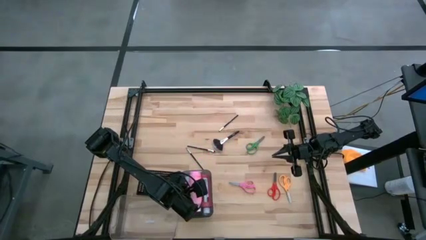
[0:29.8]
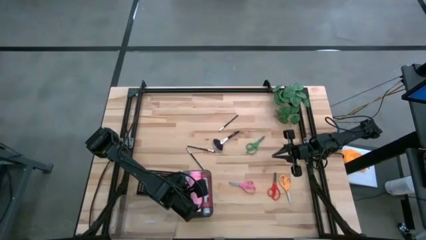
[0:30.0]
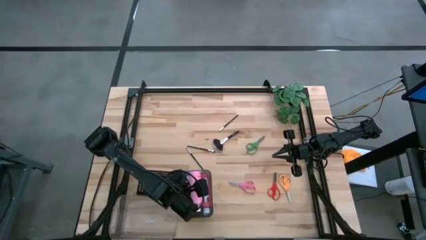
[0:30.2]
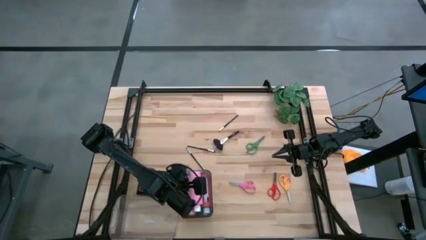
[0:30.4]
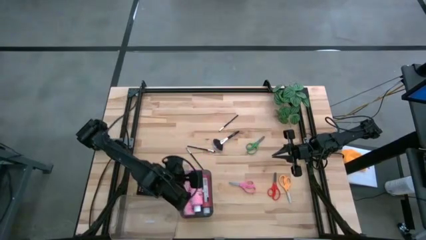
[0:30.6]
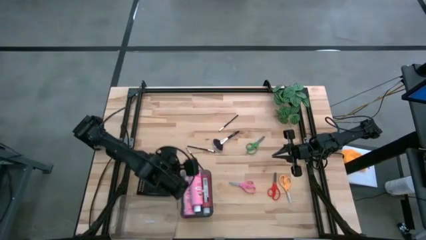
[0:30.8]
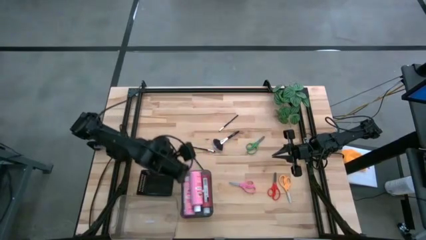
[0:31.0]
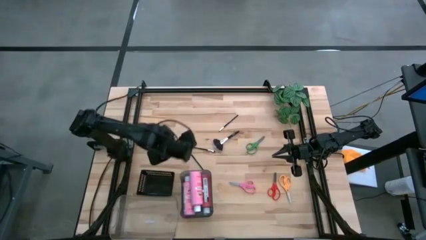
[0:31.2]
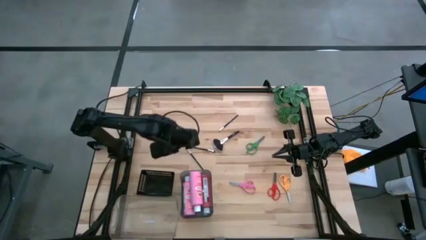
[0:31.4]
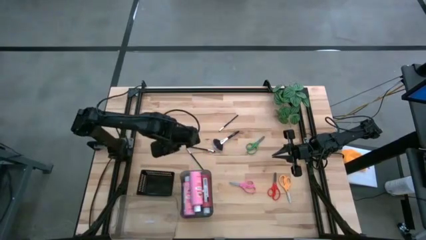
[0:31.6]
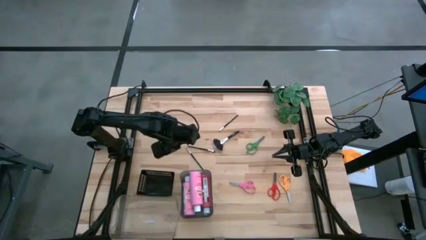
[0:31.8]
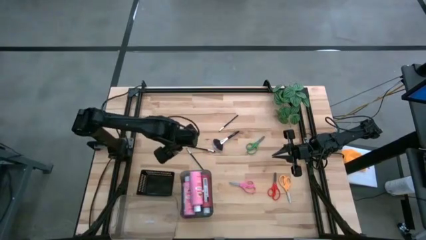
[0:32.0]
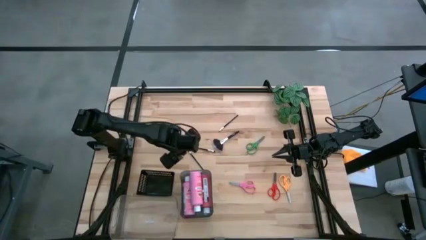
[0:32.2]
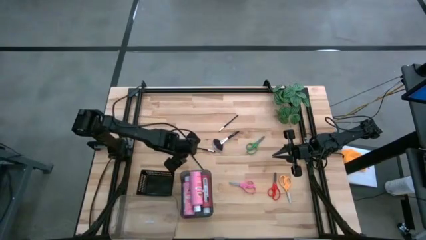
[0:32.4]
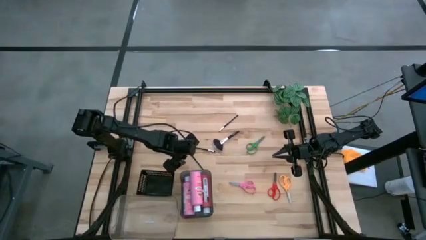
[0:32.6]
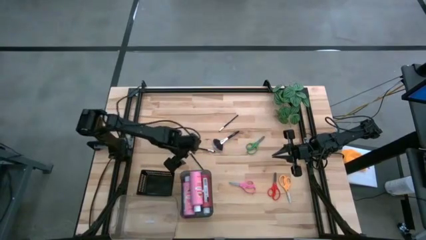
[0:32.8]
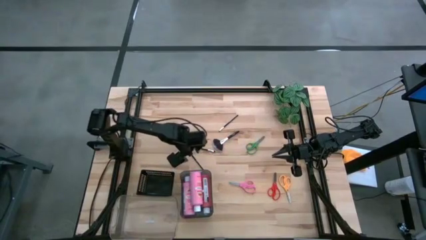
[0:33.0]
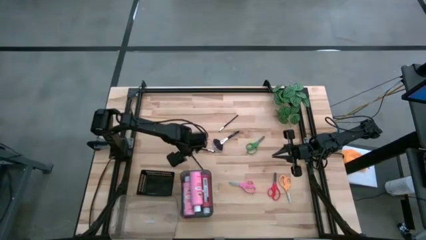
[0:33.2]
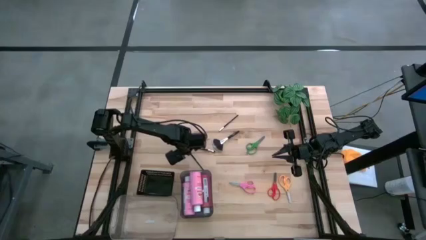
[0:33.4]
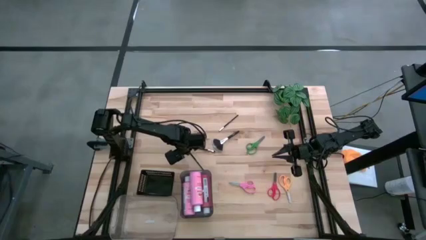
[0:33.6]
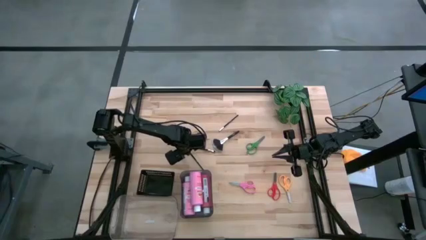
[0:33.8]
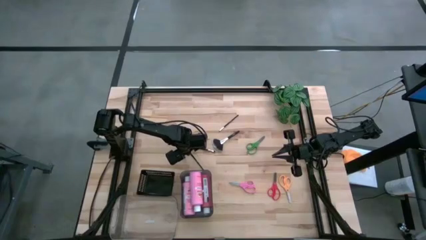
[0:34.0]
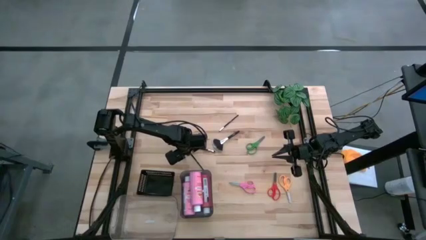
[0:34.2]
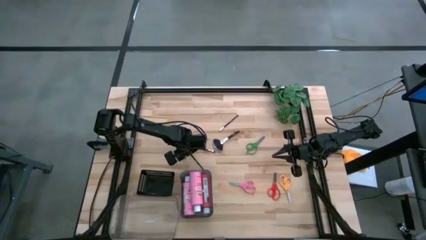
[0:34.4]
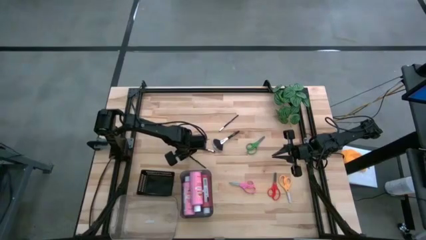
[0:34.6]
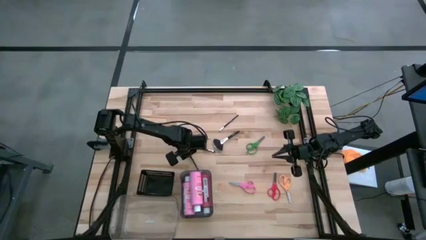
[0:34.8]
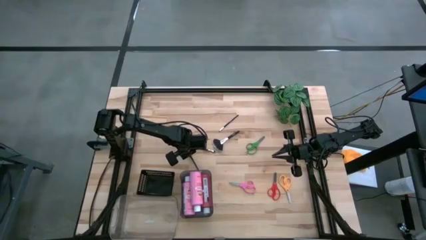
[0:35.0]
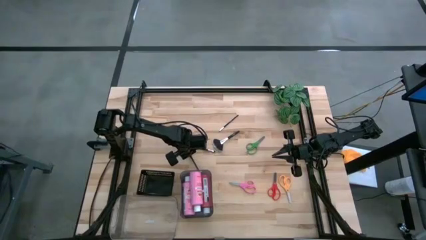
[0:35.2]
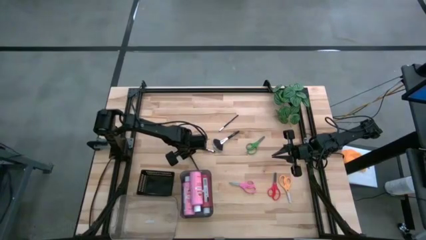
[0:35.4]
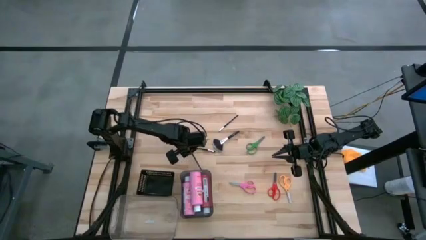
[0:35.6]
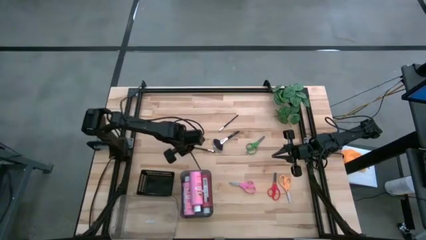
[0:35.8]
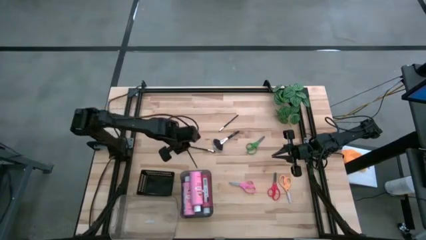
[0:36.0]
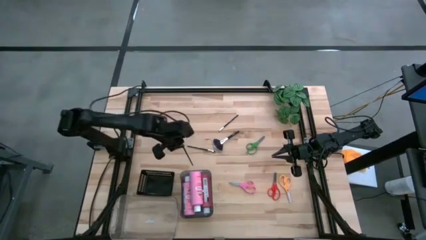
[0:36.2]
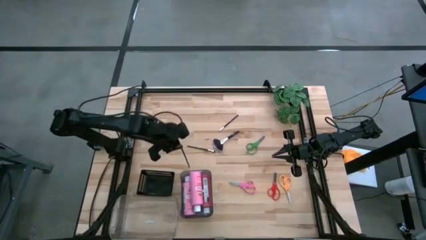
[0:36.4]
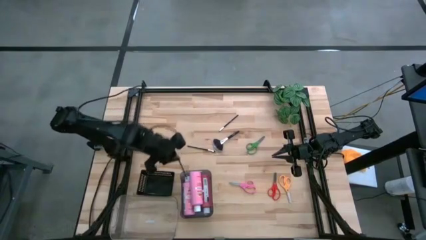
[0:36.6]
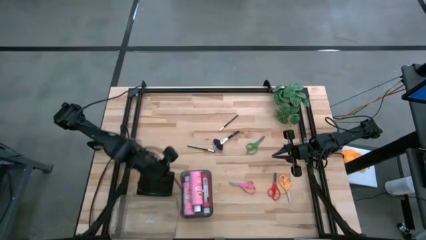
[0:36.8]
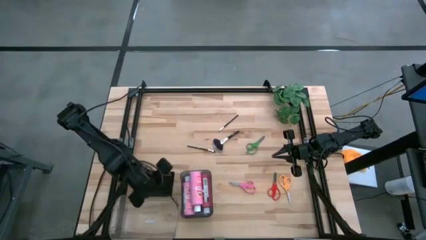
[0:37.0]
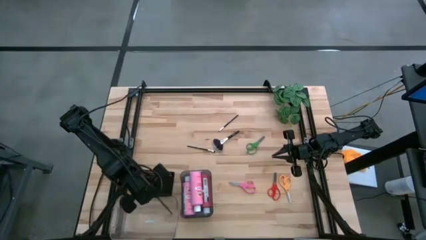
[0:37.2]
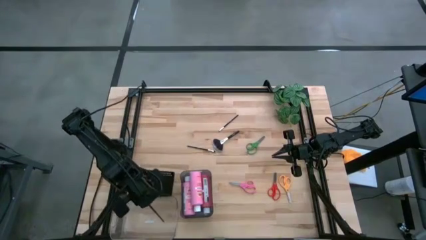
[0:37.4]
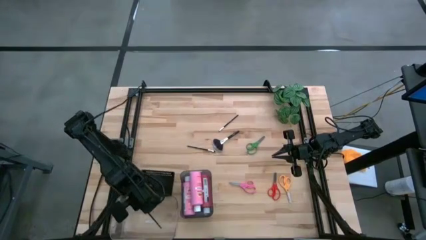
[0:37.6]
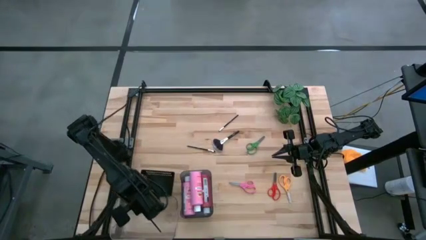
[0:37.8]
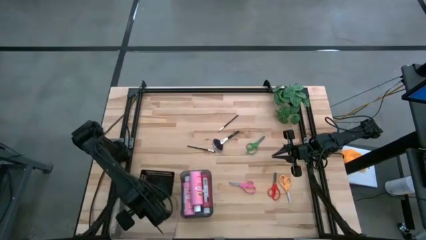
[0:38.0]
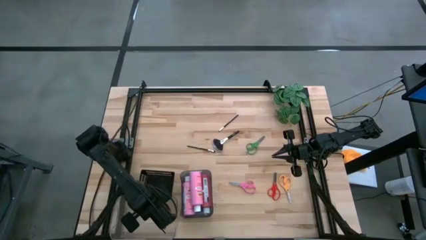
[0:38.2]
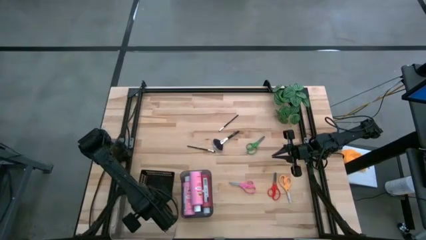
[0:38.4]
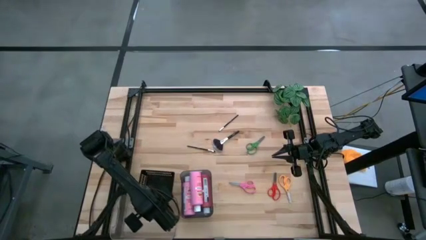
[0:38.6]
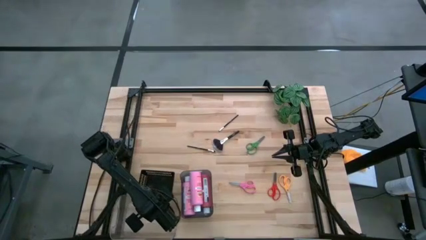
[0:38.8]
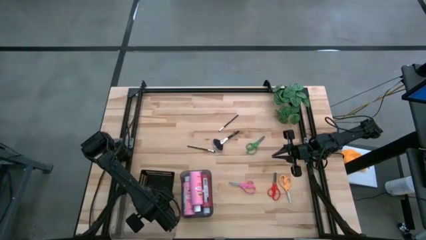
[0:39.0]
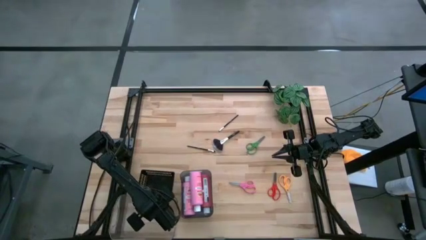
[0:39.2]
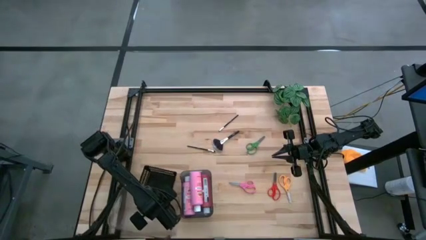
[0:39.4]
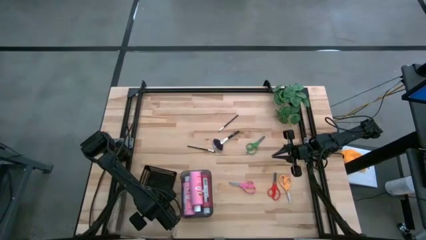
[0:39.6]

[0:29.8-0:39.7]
Task: Pick & Place Paint Supplies
Put the bottom eyeshadow brush into the transparent bin

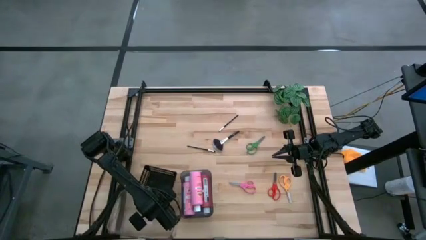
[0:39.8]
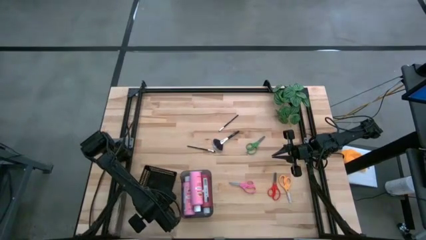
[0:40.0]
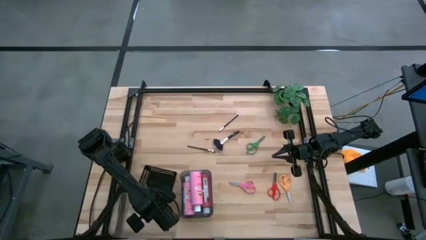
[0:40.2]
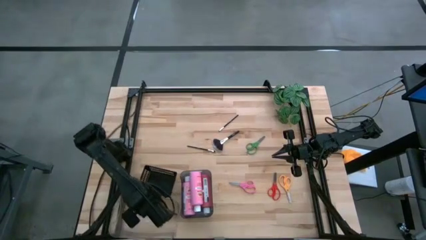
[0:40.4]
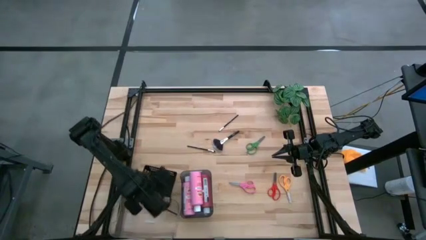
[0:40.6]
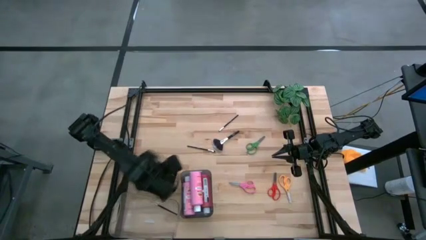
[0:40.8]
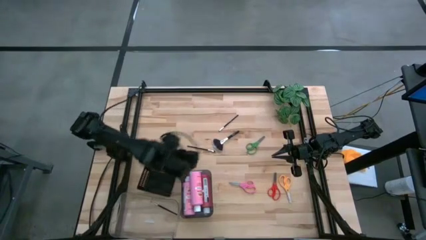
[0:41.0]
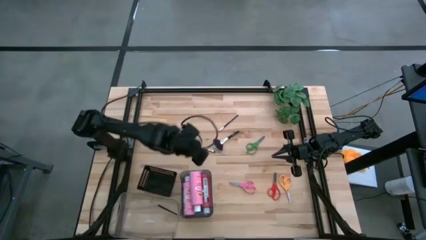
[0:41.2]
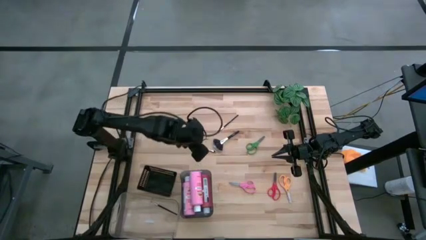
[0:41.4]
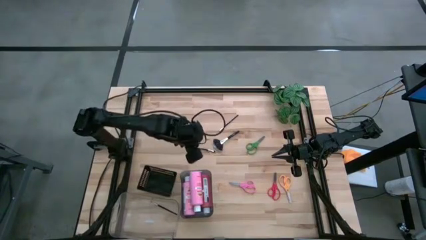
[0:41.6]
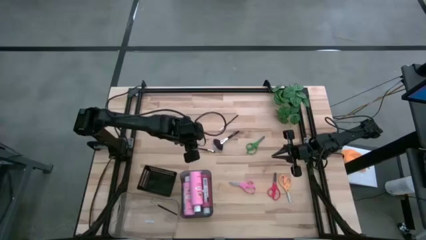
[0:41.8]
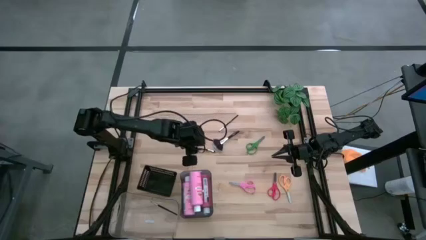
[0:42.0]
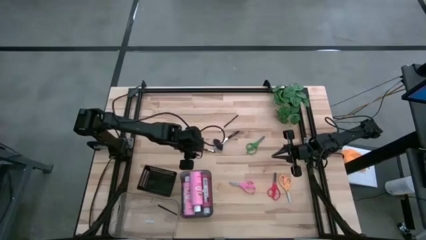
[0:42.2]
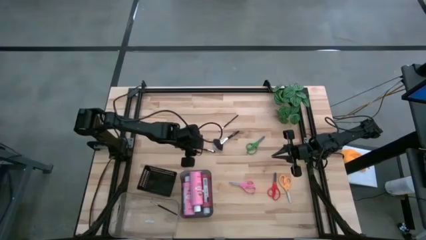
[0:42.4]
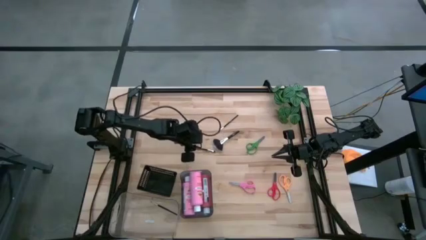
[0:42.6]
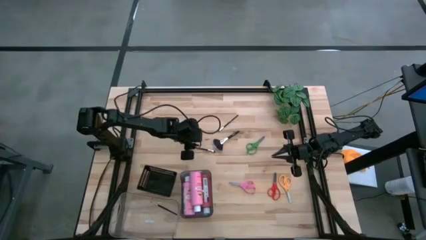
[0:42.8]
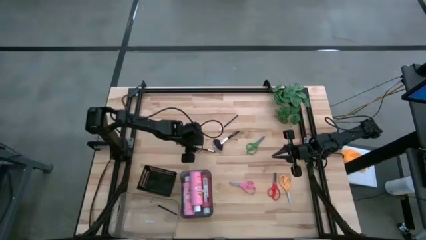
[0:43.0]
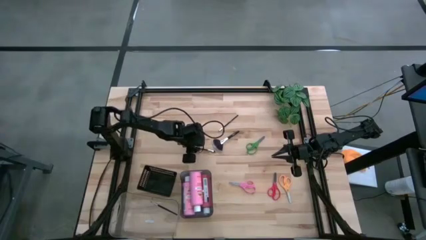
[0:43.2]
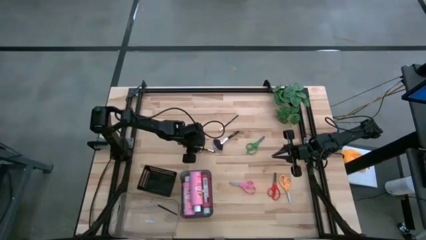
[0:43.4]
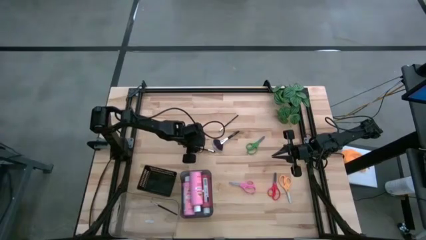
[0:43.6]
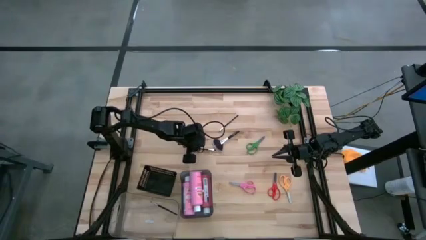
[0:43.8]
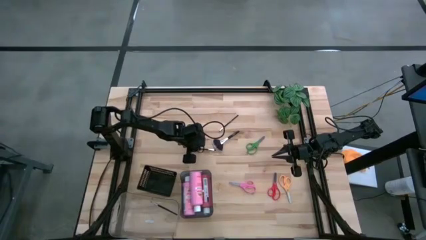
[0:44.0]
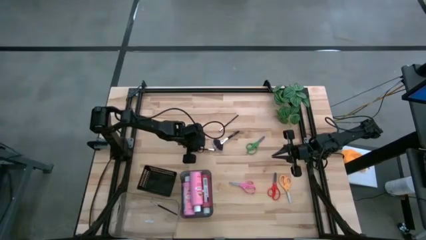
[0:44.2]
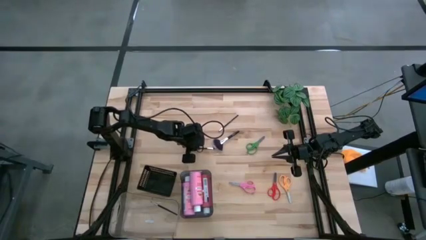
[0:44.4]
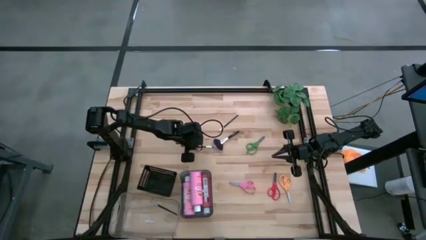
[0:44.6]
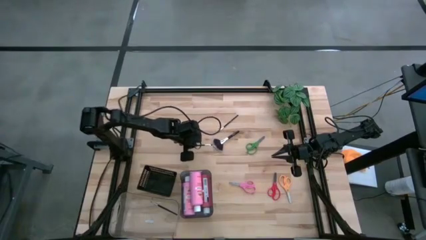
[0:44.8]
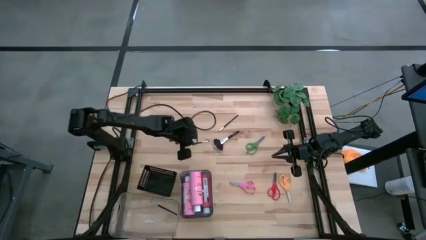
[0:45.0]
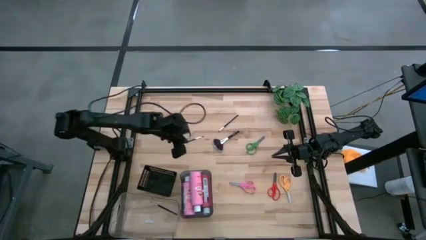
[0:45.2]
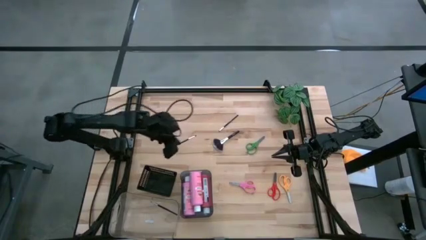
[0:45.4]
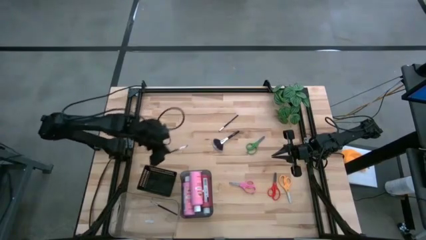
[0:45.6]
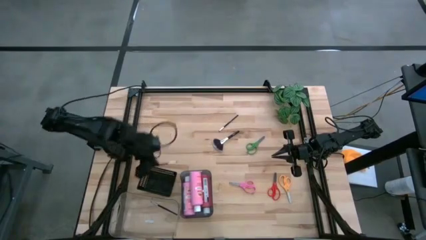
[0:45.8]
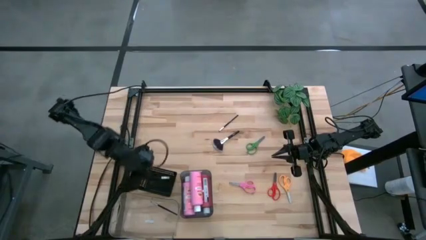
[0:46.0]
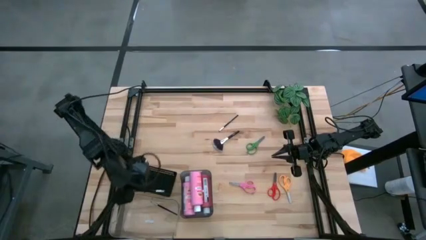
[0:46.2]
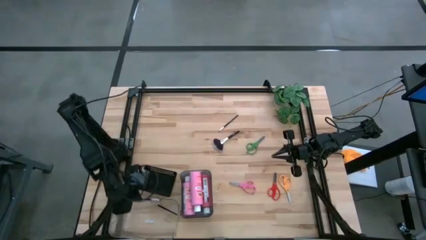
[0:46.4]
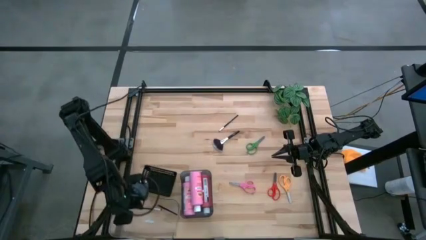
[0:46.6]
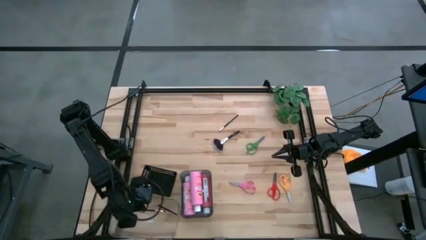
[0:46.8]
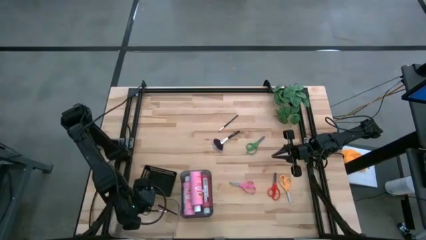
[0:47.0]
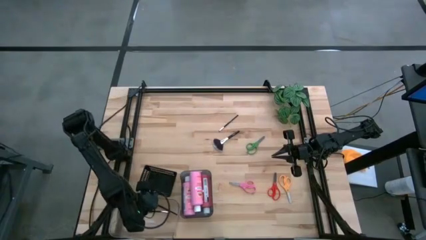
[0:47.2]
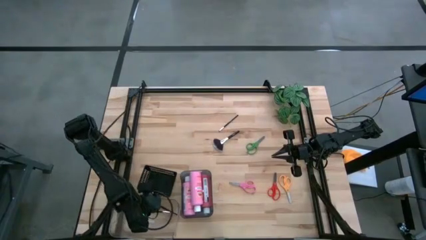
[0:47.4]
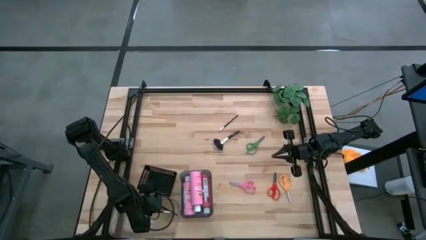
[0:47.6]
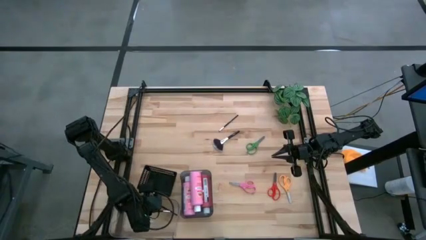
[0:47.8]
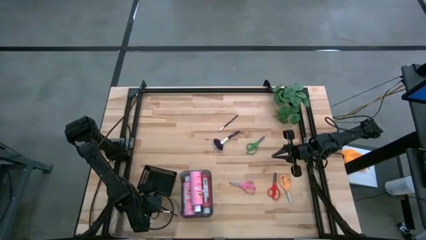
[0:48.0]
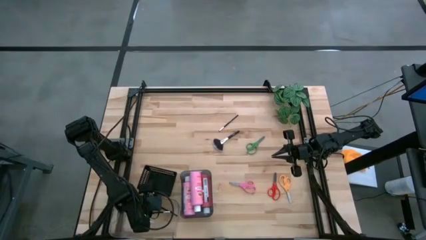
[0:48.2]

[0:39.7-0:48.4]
Put the bottom eyeshadow brush into the transparent bin
